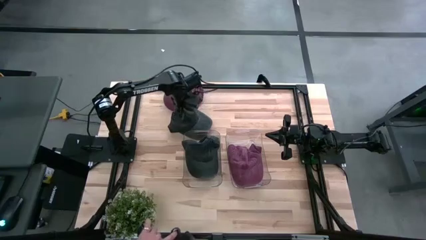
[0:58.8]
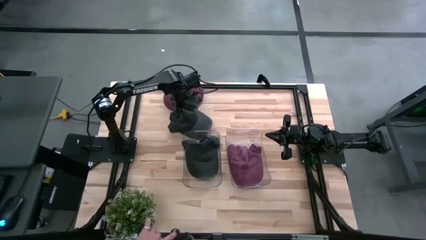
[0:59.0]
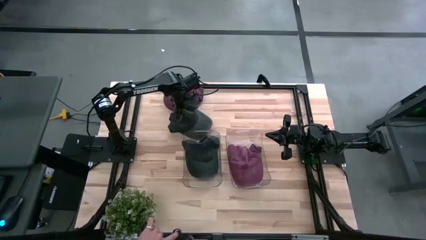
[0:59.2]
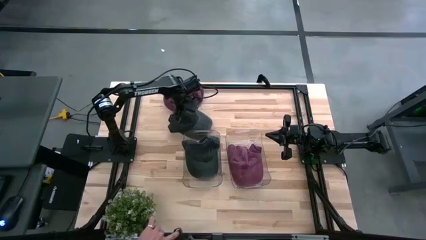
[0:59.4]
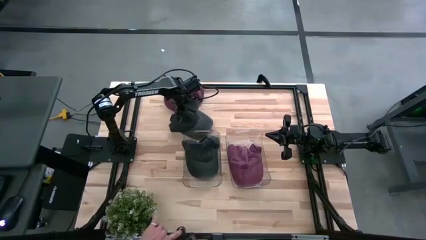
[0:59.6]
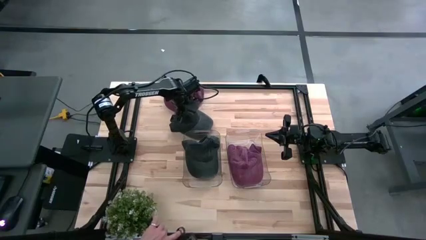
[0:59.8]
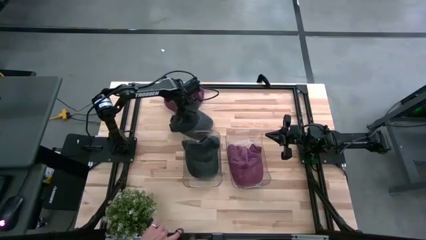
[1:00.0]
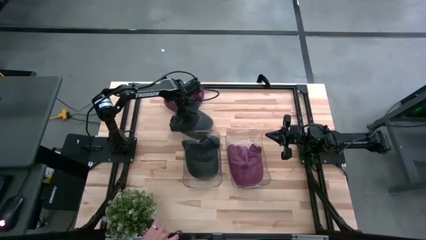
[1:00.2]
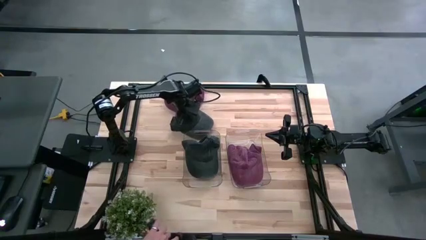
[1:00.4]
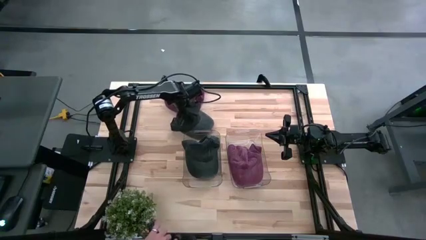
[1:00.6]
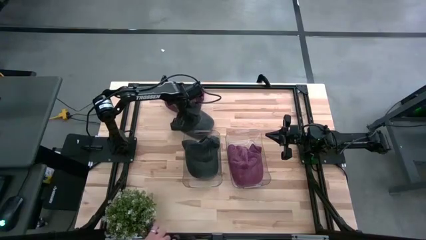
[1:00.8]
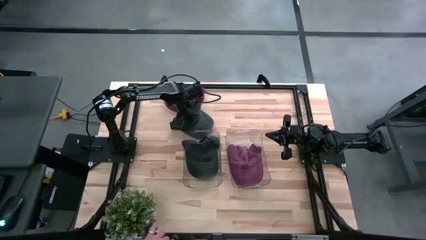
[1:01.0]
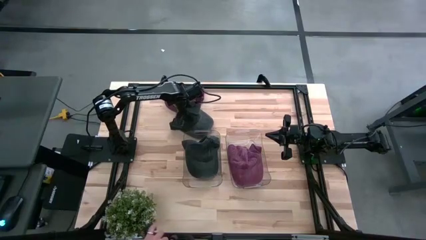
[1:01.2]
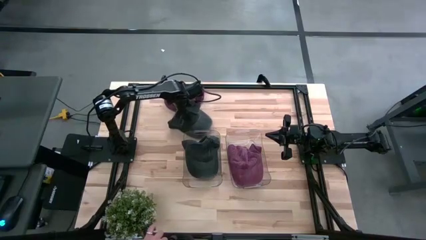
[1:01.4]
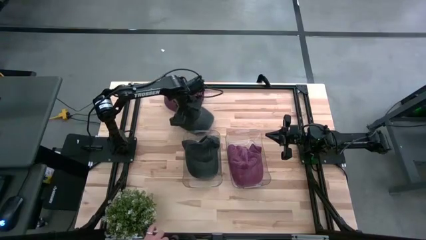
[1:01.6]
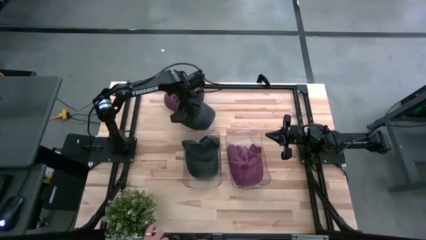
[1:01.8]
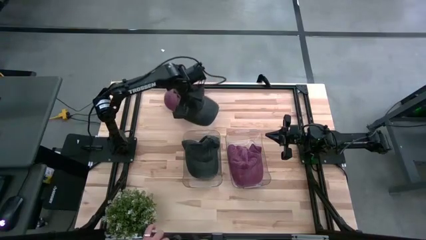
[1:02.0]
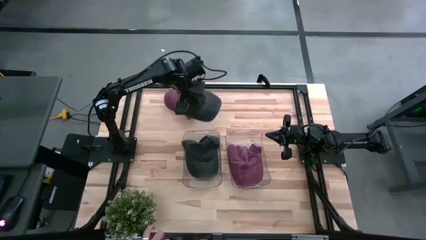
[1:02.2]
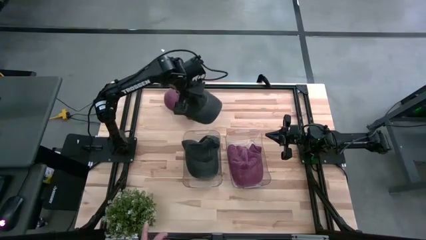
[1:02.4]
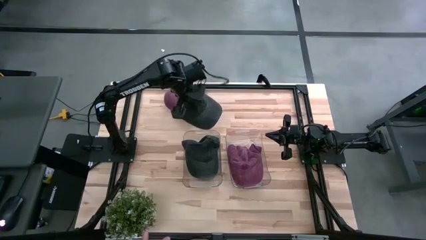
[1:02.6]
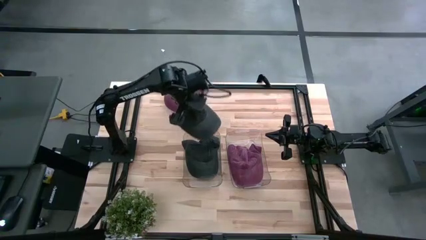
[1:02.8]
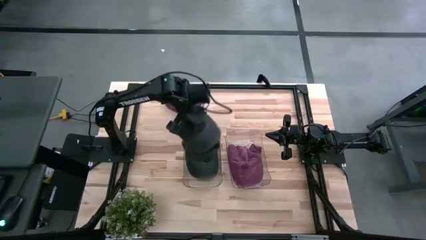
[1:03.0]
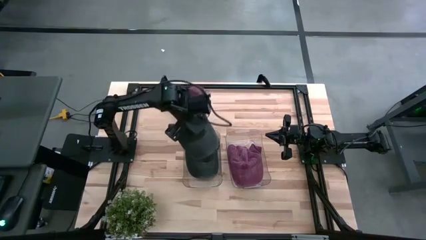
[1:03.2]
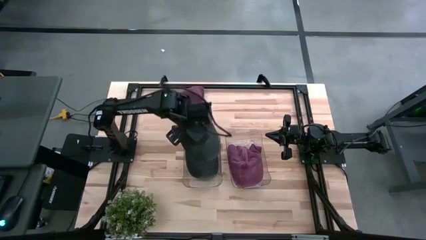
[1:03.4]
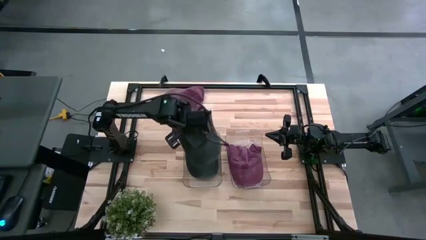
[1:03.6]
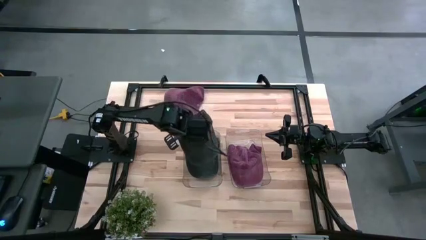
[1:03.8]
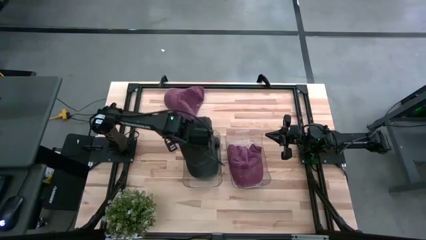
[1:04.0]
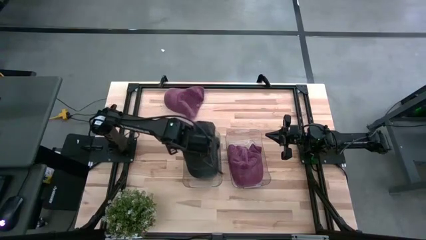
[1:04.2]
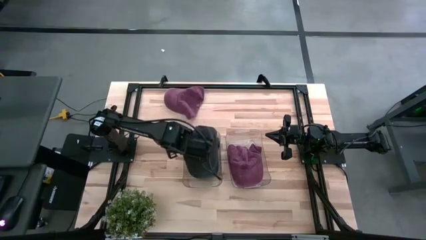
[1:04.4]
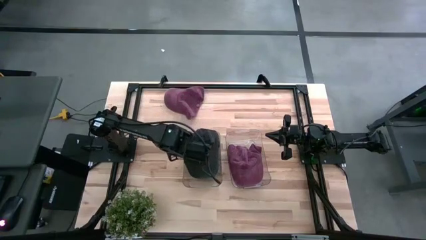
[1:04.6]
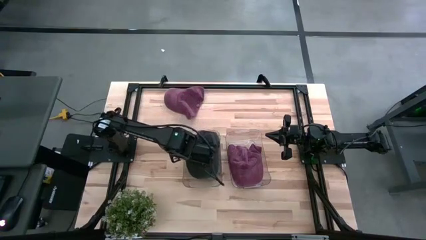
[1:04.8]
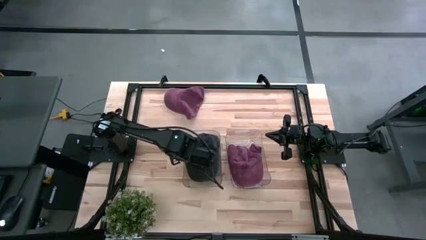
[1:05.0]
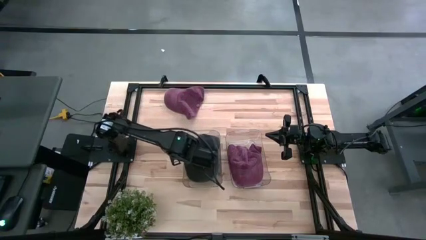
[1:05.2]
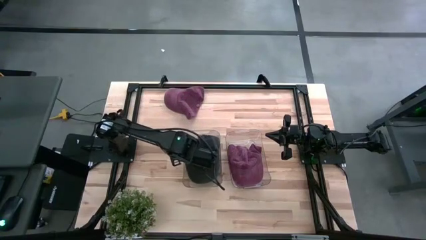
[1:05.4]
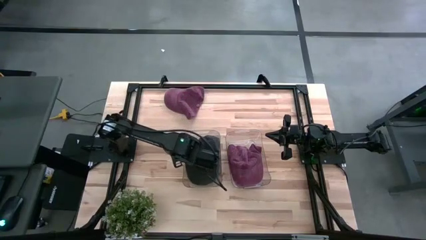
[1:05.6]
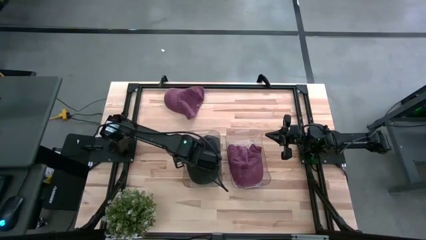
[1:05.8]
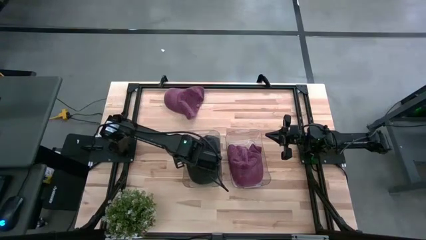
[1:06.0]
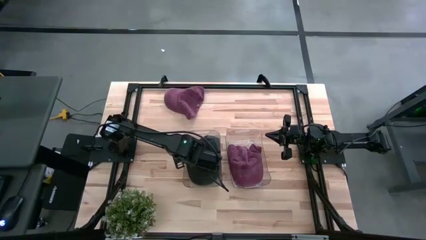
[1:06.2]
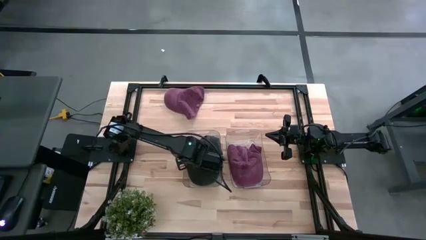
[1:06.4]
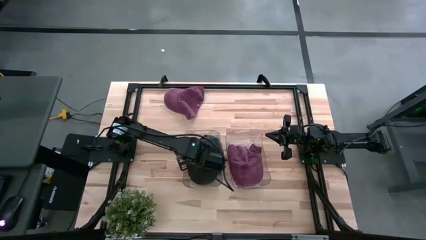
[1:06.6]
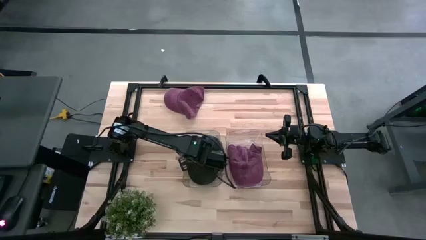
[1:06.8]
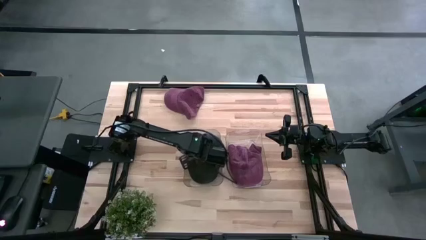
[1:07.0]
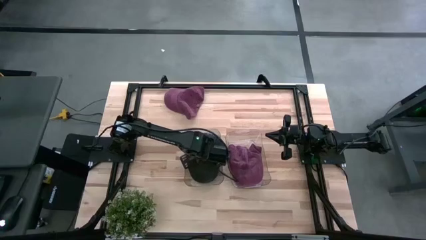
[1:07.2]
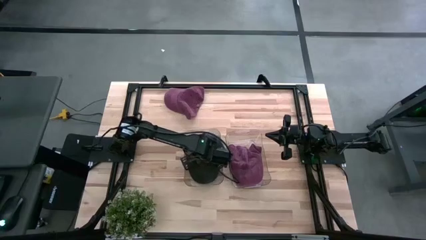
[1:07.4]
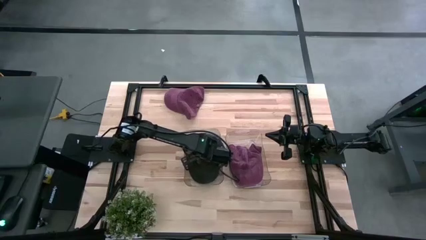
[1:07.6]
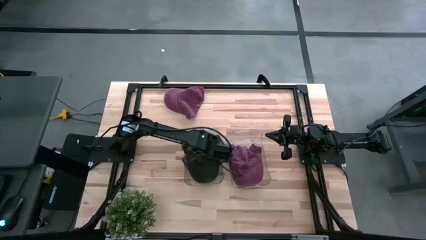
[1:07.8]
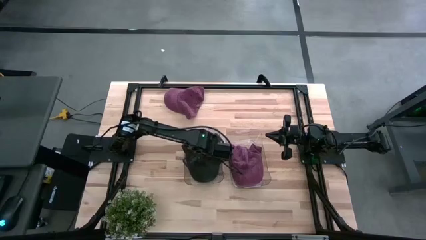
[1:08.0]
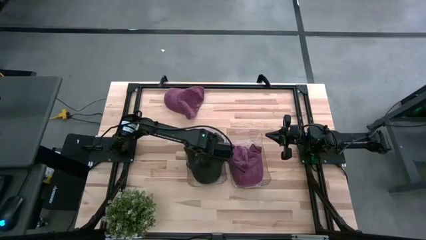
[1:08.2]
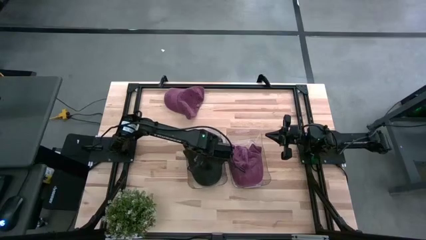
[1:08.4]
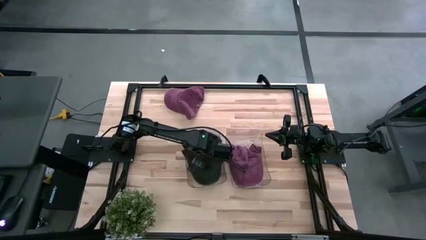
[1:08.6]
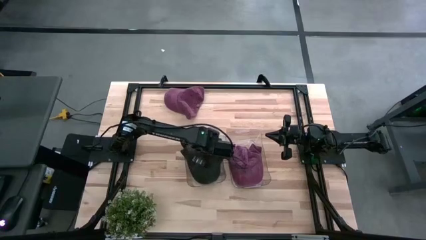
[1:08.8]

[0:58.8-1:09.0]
Task: Pick & Place hat
Put the black cap into the left transparent bin
